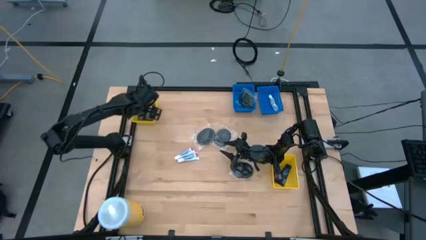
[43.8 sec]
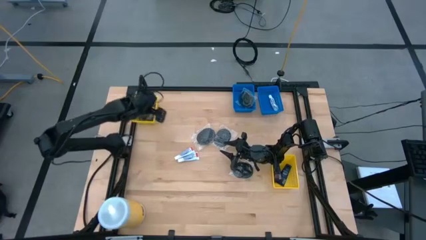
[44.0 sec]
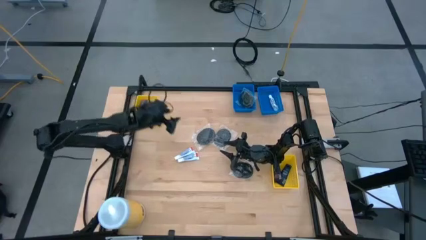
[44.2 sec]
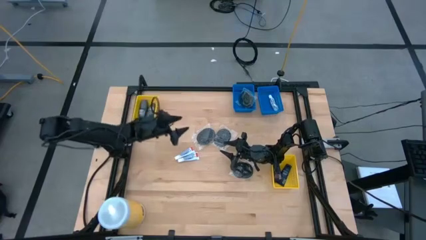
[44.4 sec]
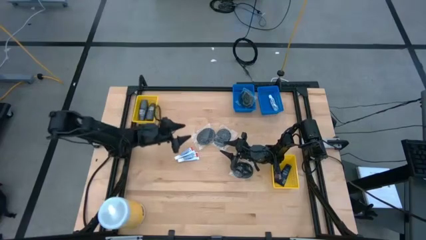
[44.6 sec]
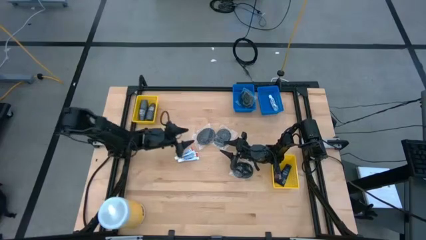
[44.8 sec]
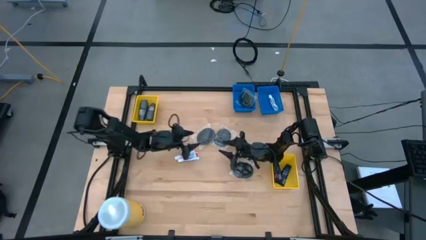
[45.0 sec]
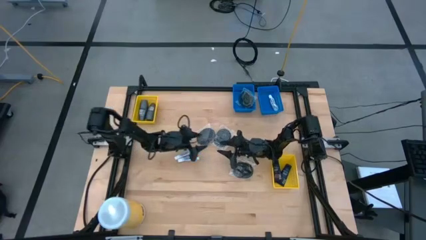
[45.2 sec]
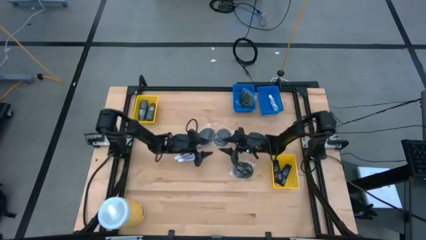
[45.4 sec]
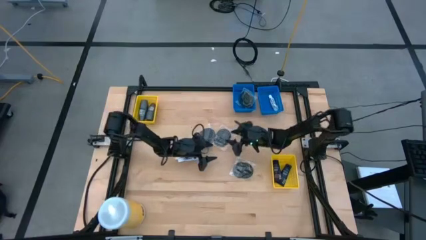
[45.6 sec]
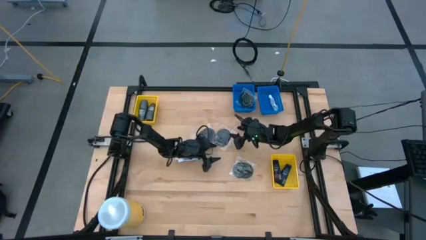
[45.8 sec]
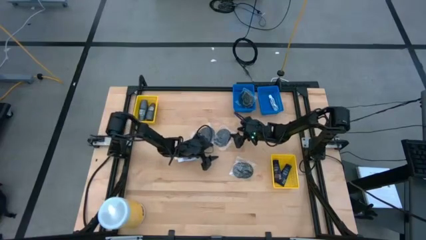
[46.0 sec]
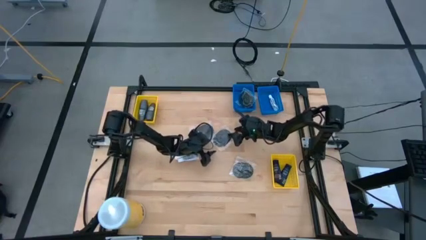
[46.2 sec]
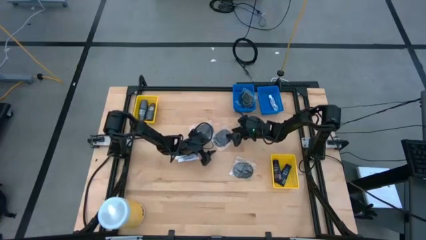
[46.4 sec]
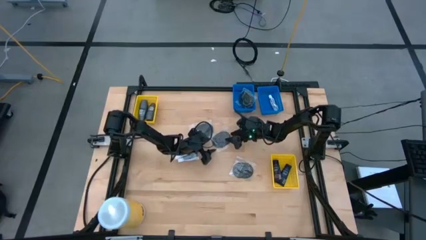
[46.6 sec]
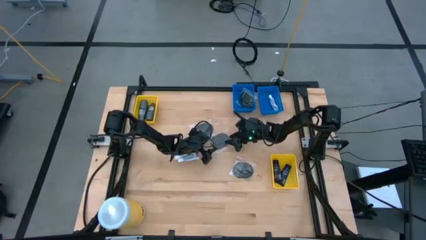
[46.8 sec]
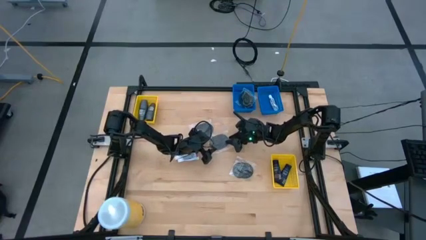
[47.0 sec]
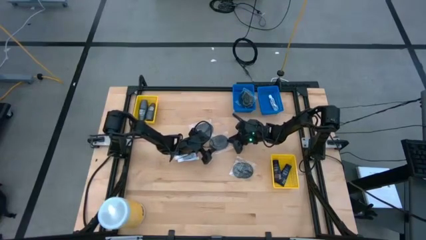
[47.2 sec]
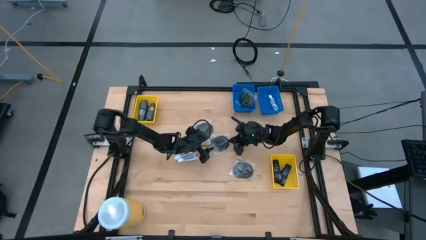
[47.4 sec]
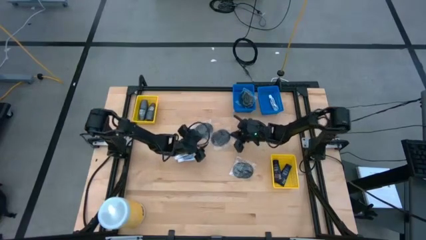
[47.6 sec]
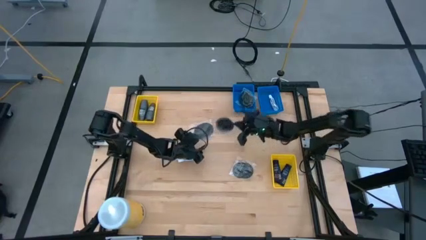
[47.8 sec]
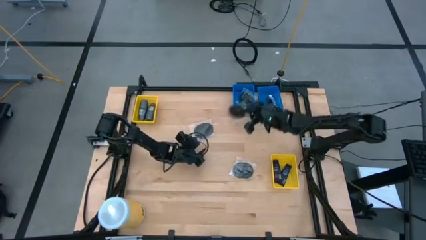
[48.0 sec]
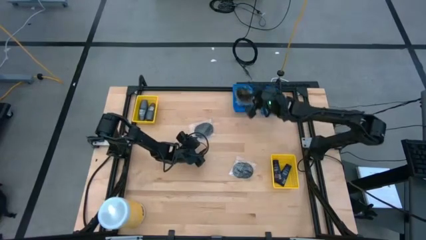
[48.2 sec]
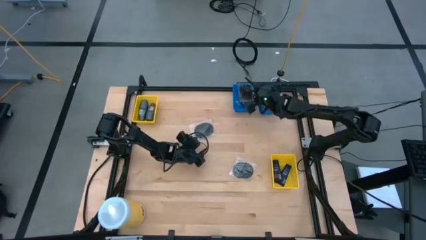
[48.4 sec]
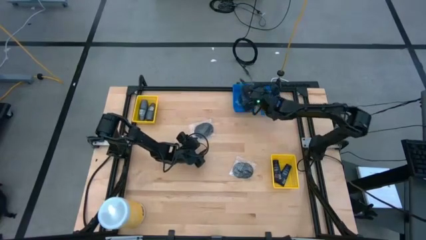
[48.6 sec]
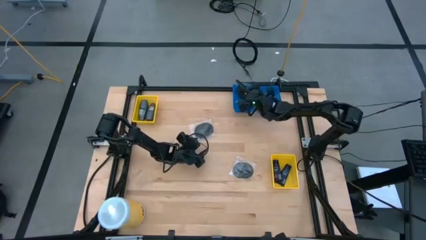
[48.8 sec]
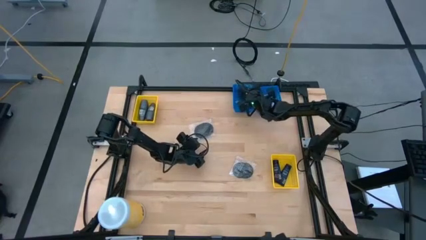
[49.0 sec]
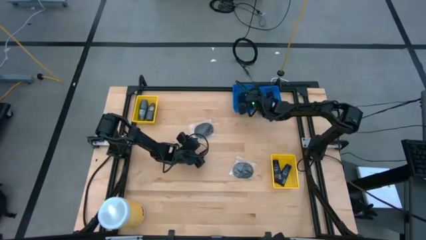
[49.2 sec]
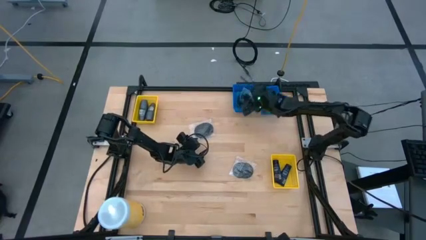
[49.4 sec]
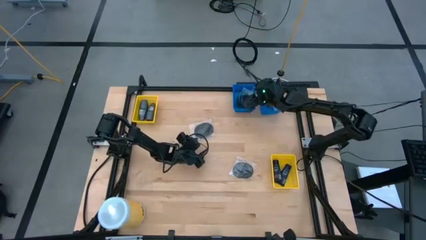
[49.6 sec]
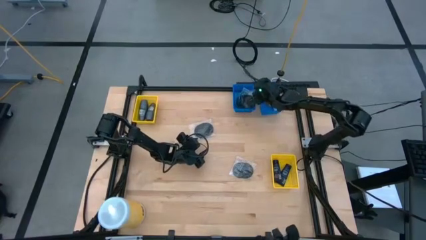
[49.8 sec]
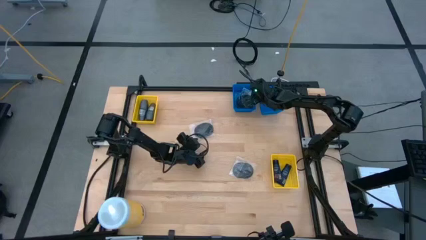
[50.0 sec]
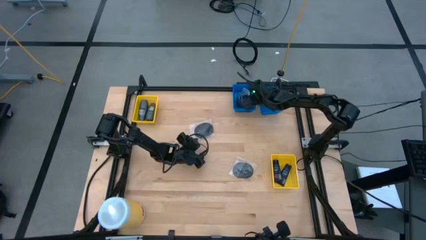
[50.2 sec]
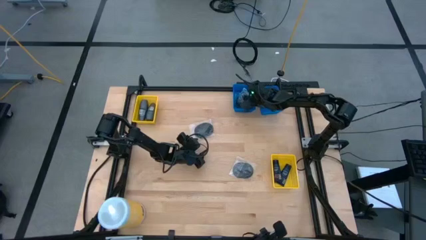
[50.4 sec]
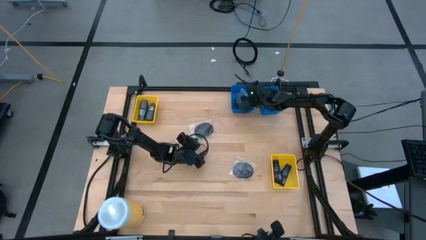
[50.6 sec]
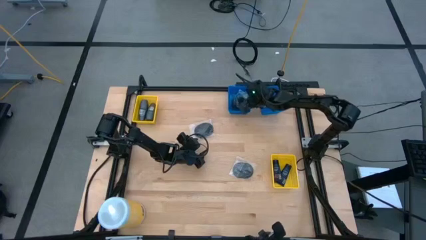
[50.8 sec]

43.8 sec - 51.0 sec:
Task: Pick & Place Travel size toiletries
Put the black hairbrush into the left blue bin

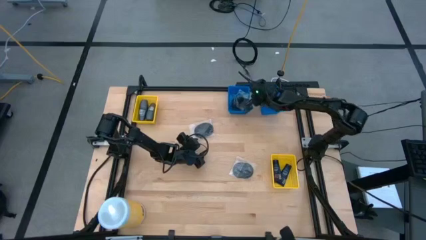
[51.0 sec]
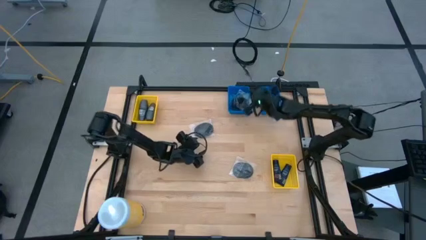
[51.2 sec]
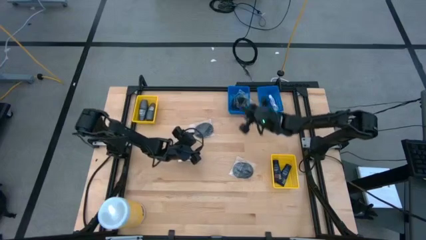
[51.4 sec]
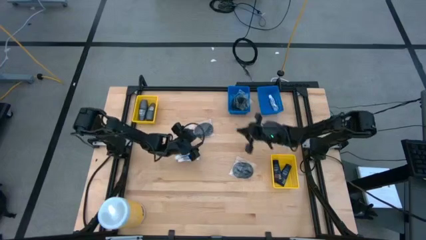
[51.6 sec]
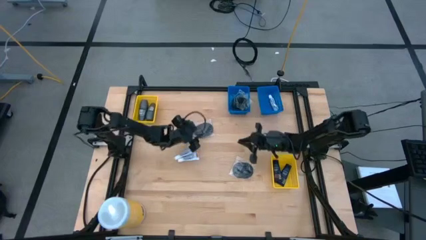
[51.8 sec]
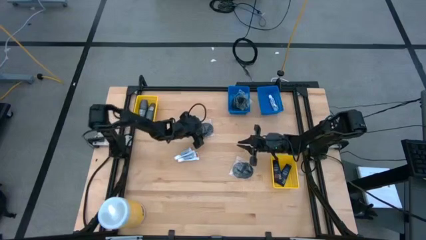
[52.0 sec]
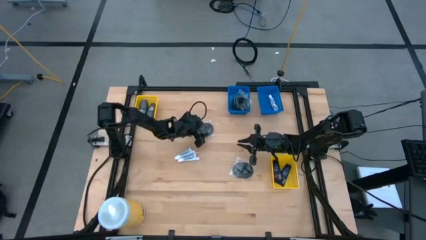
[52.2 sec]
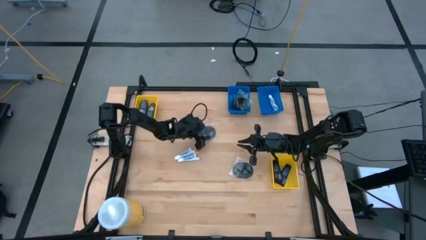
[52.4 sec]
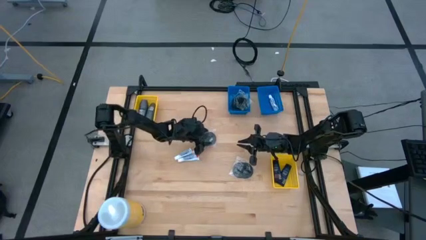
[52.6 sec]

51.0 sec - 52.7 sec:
Put the black hairbrush into the left blue bin

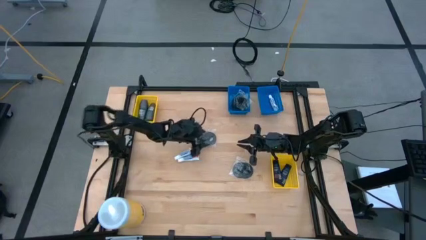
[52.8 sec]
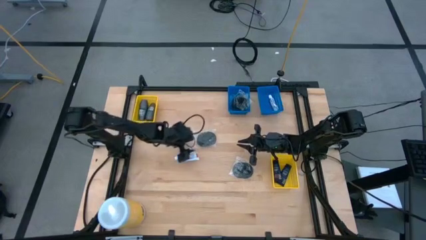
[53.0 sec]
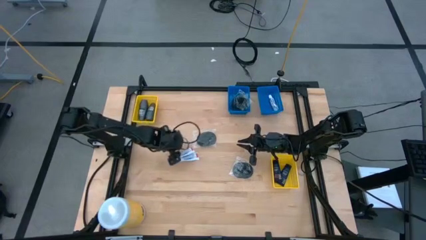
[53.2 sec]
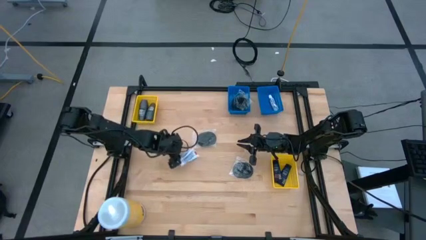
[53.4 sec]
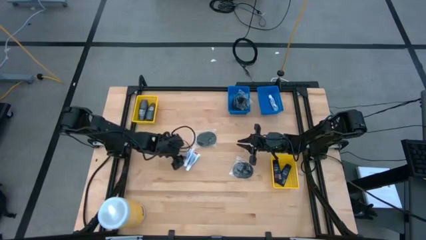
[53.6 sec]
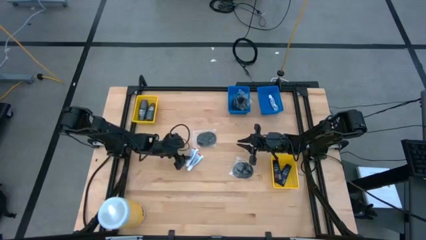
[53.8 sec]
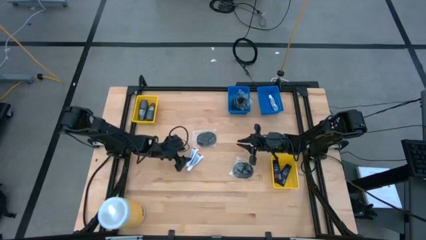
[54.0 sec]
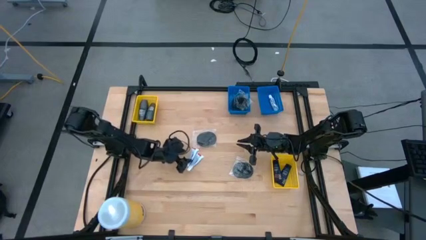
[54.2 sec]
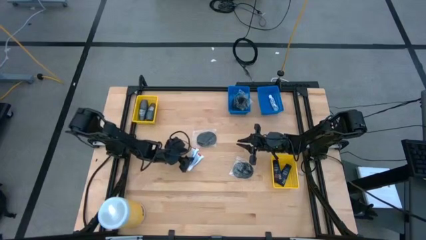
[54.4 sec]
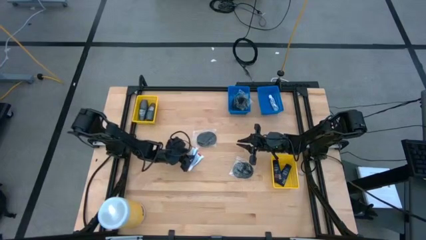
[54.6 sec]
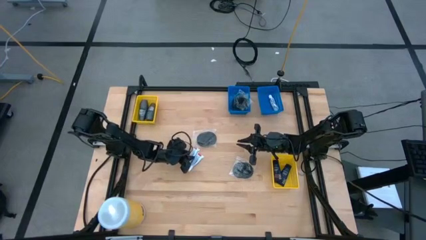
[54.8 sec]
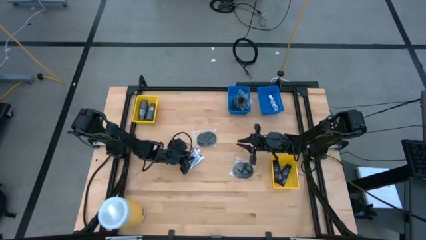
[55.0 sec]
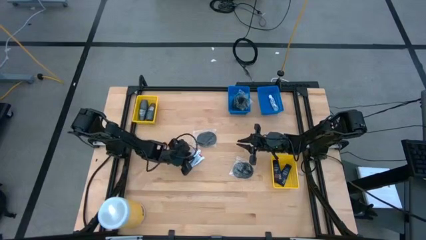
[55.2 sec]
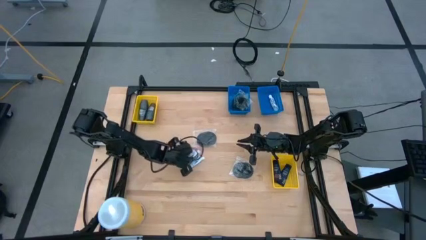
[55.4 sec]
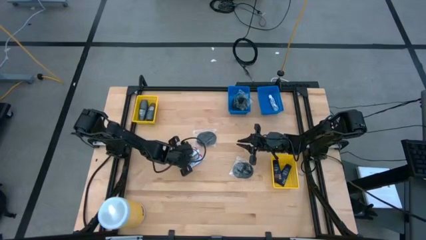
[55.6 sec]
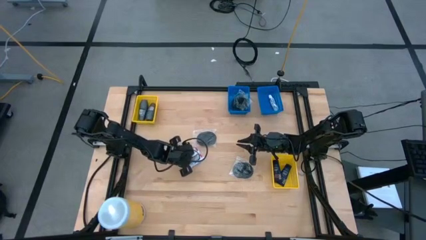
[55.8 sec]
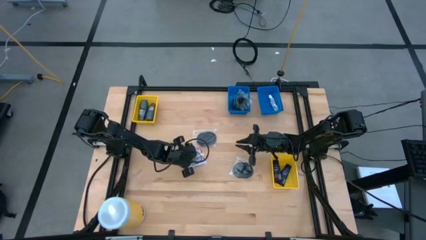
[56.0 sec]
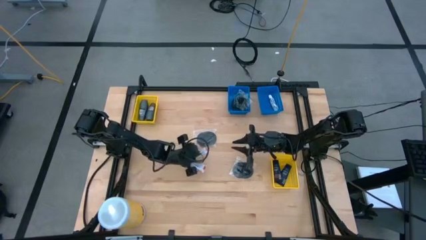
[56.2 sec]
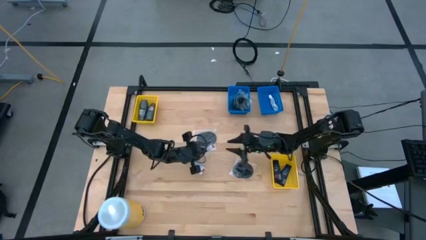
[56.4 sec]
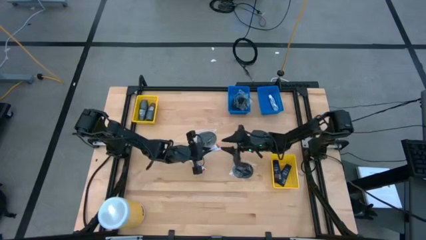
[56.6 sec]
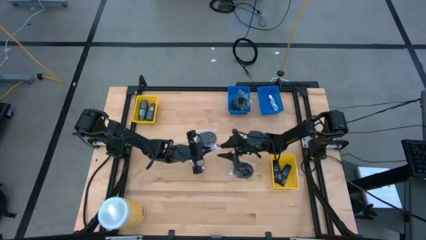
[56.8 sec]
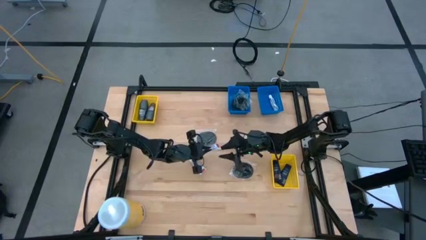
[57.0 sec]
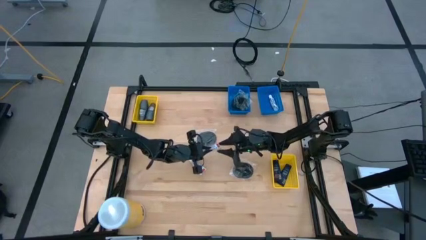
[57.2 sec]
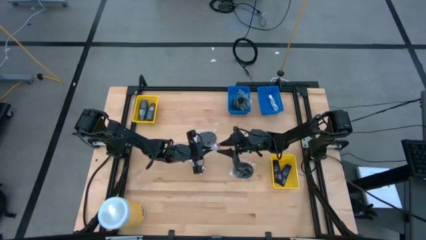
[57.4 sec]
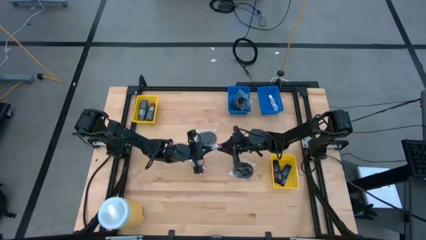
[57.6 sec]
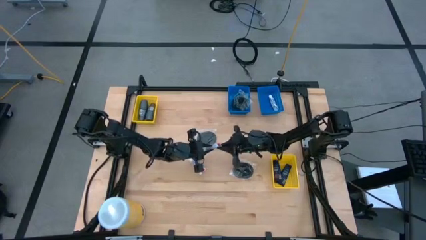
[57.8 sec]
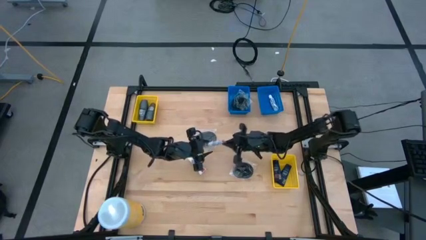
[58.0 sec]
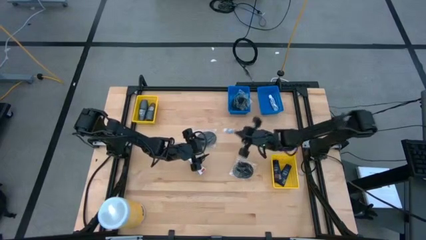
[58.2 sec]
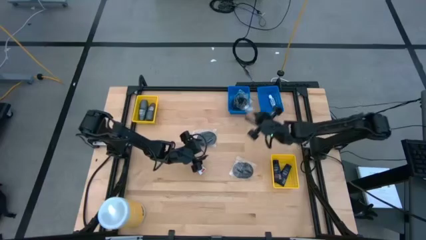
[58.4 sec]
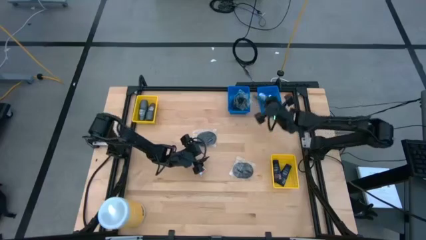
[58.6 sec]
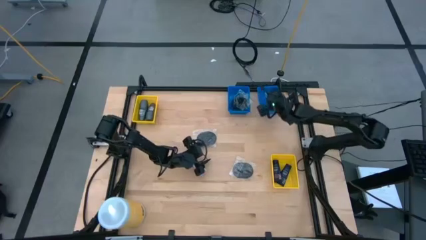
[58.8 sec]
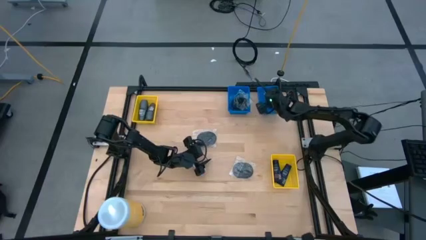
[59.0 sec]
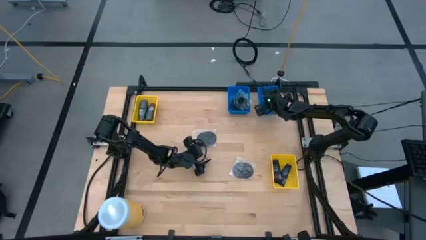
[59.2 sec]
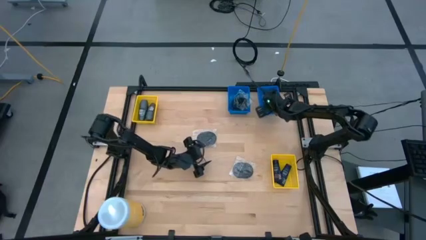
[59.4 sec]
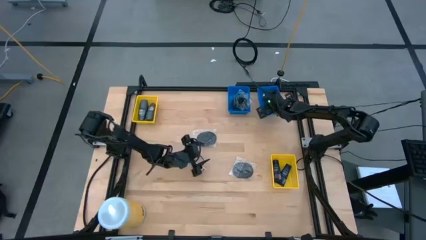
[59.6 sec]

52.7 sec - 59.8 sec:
Put the white toothpaste into the right blue bin
